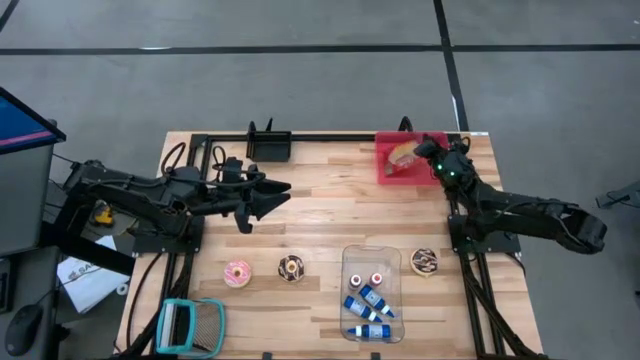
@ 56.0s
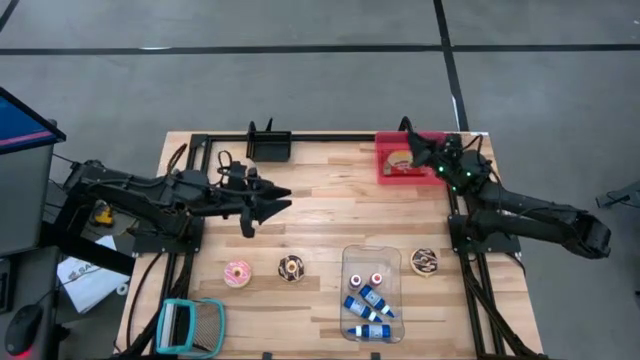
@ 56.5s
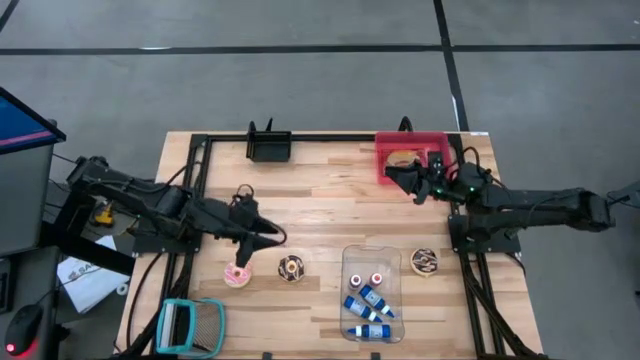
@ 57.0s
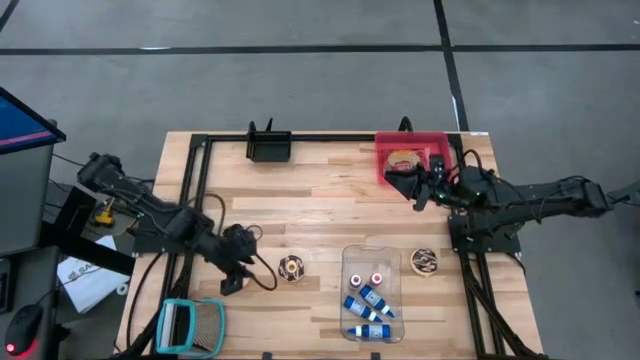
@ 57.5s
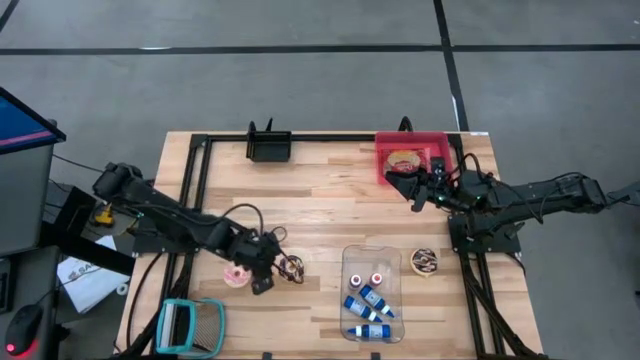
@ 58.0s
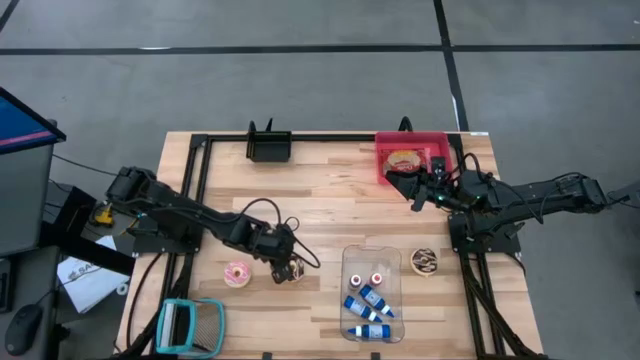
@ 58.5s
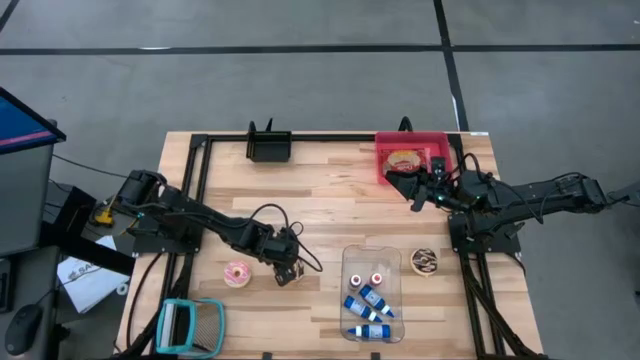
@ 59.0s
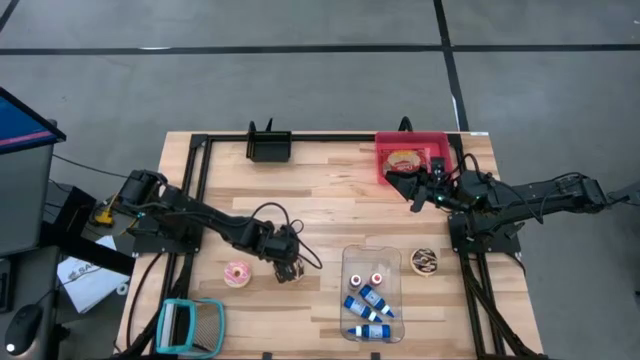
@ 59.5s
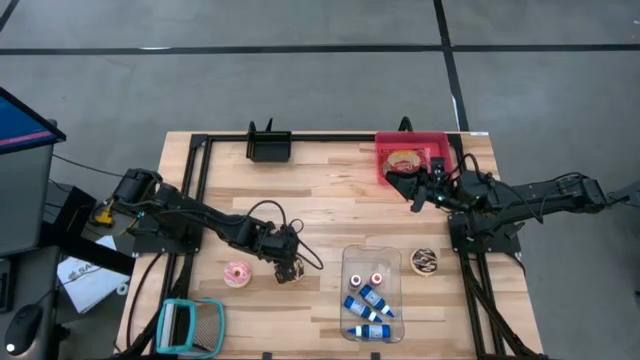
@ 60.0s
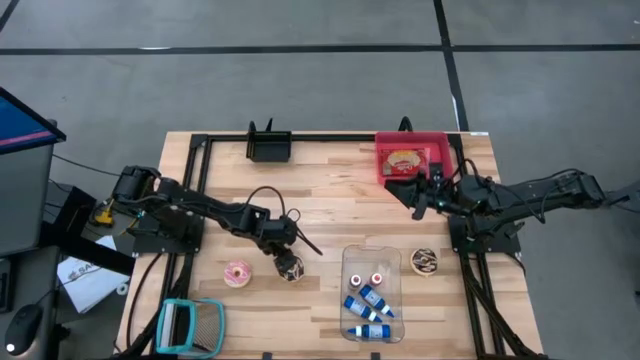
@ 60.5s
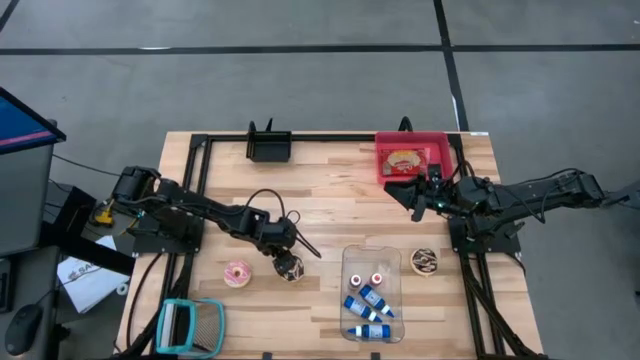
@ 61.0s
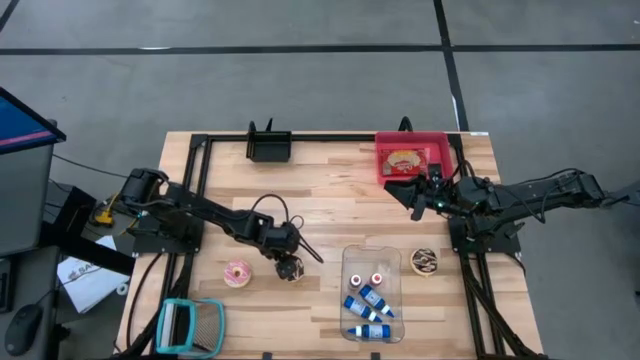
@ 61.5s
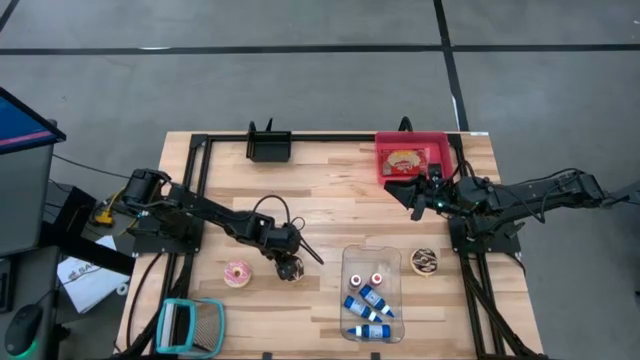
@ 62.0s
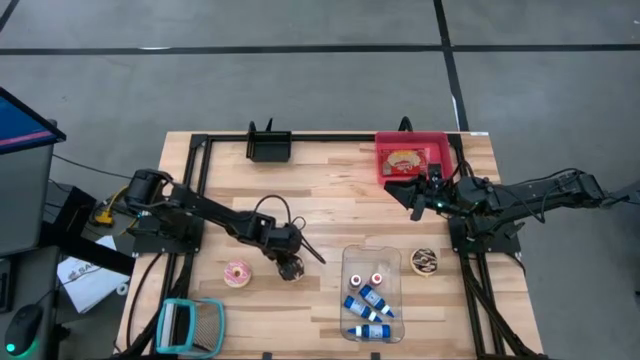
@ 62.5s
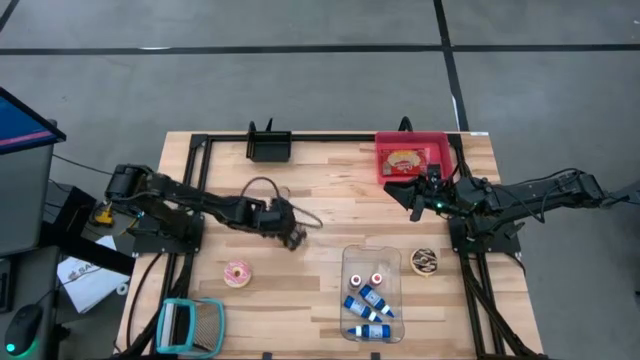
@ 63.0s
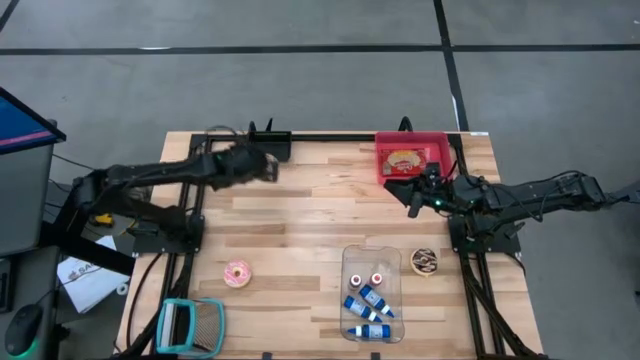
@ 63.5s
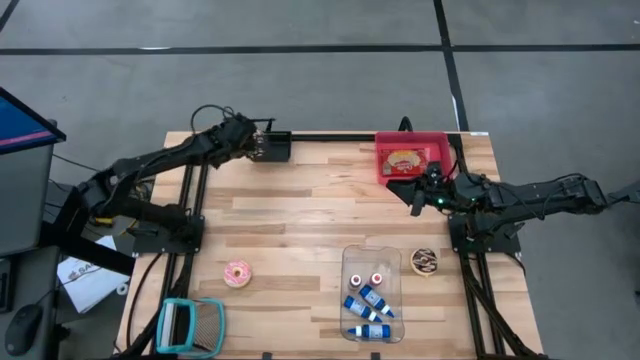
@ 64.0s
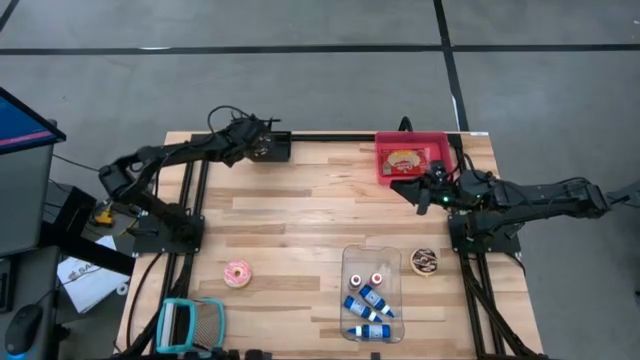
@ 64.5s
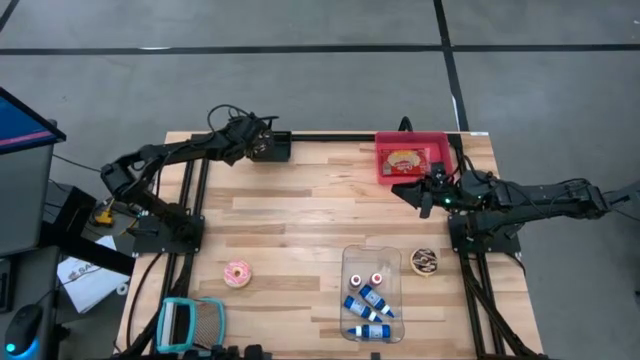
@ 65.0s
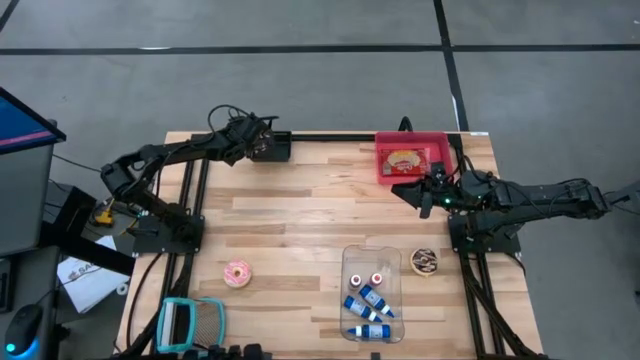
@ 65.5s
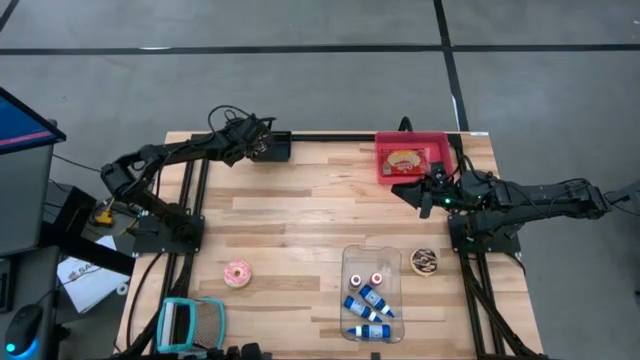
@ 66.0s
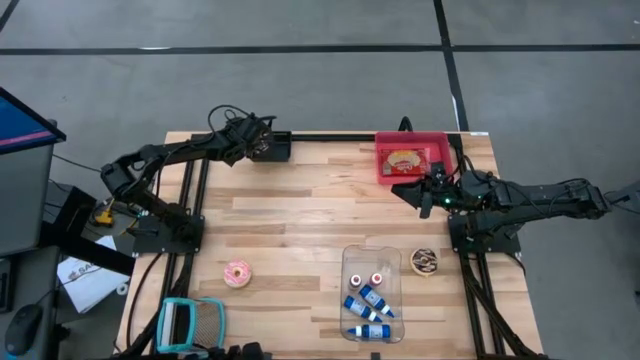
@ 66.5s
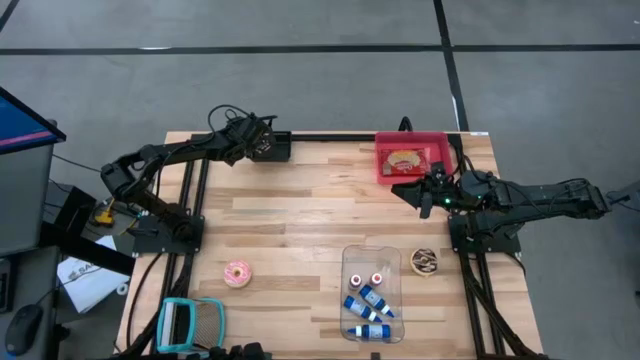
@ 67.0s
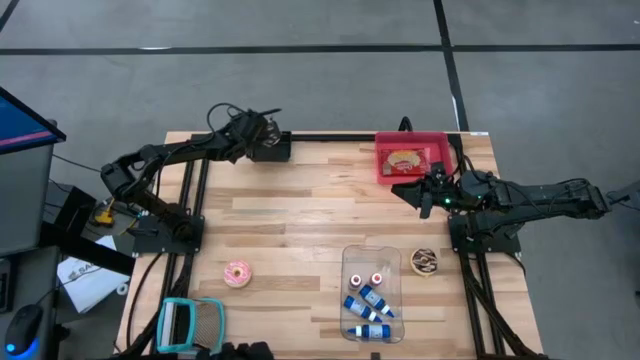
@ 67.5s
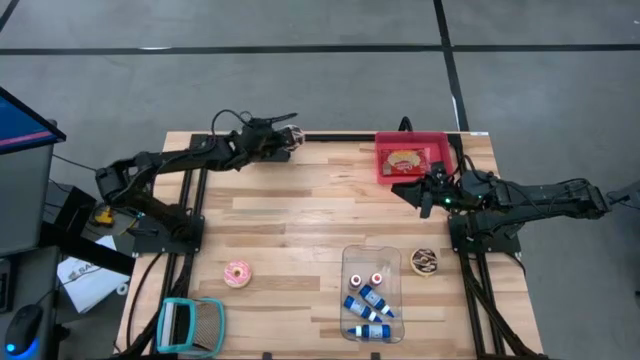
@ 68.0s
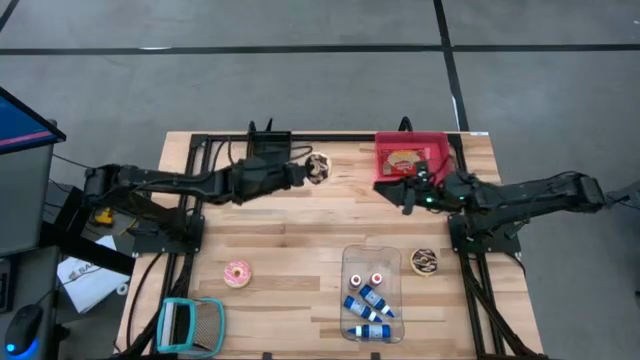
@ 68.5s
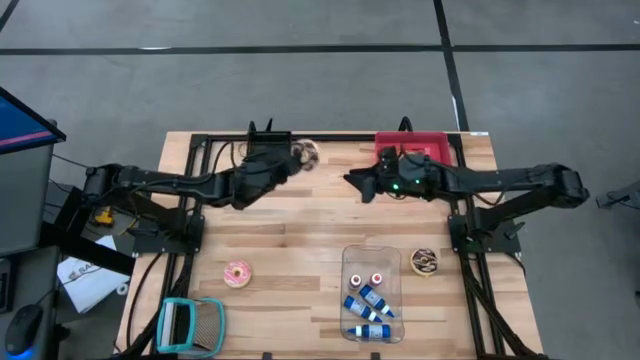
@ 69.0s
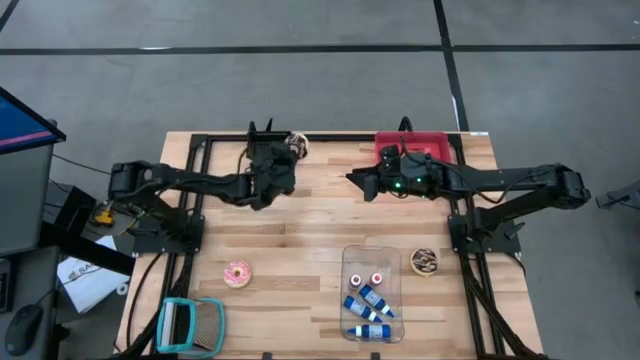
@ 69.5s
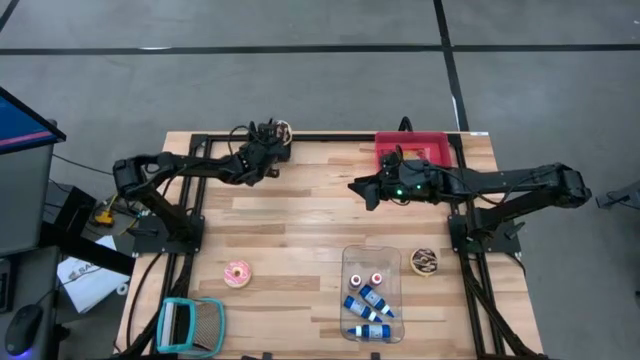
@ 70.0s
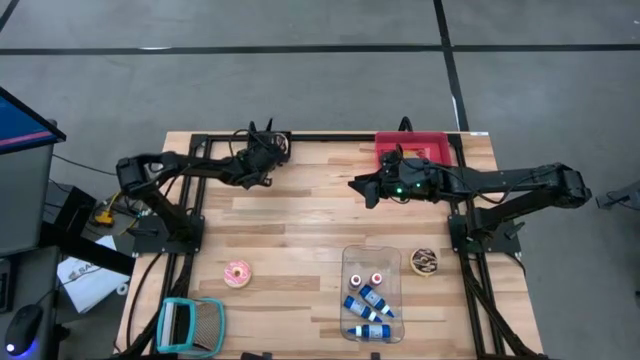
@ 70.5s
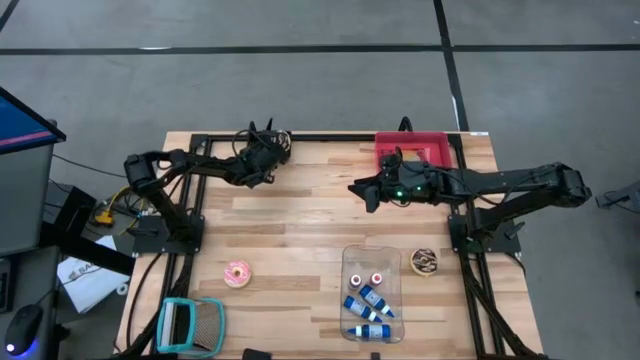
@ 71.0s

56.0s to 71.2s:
Put the left black donut into the black bin
